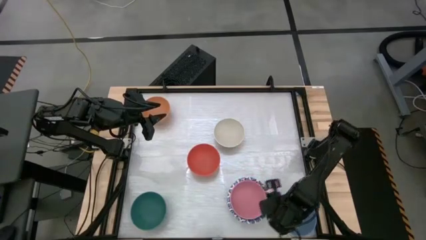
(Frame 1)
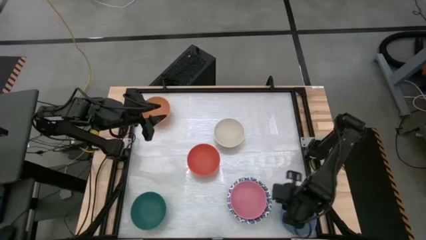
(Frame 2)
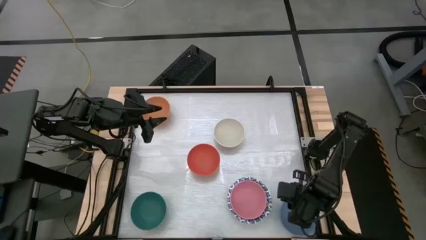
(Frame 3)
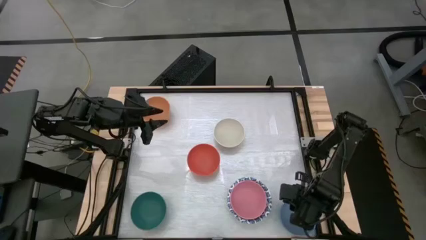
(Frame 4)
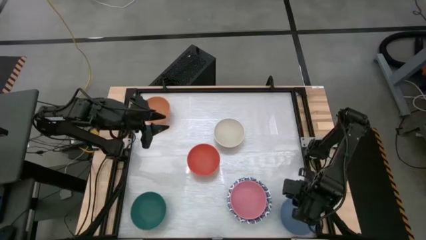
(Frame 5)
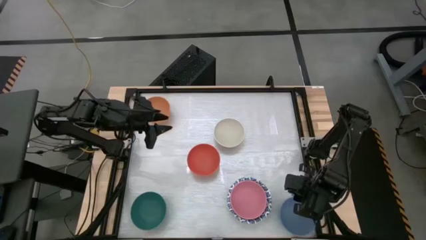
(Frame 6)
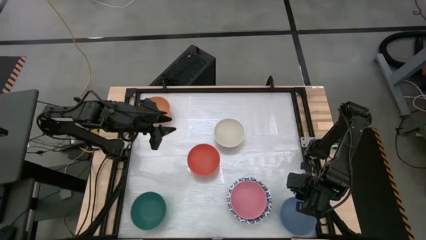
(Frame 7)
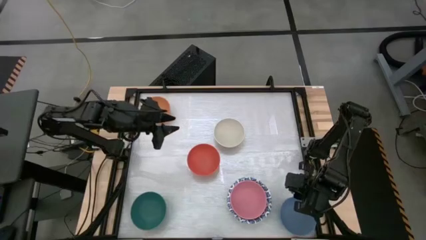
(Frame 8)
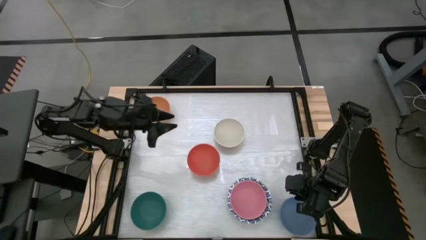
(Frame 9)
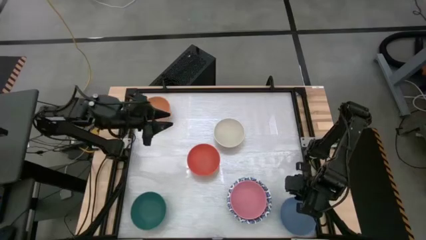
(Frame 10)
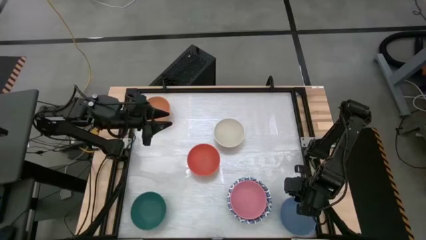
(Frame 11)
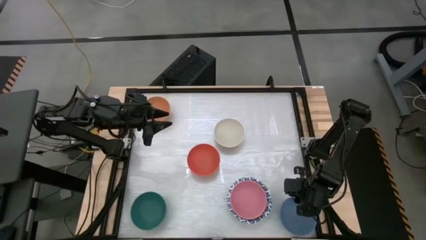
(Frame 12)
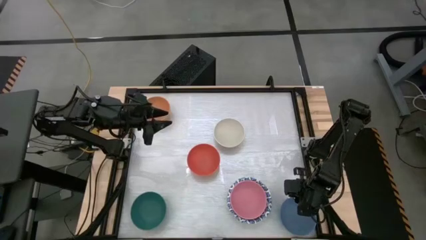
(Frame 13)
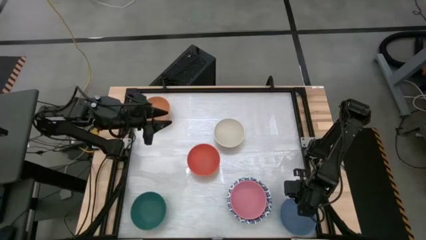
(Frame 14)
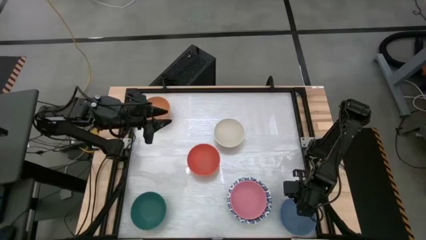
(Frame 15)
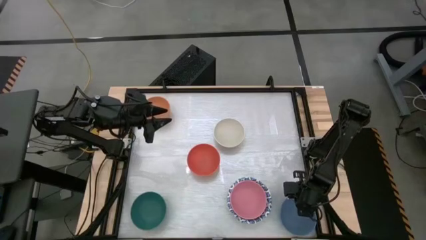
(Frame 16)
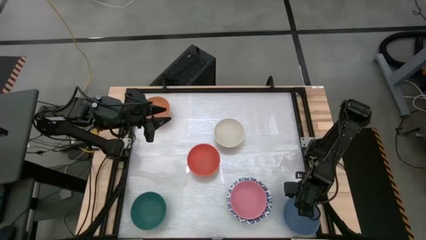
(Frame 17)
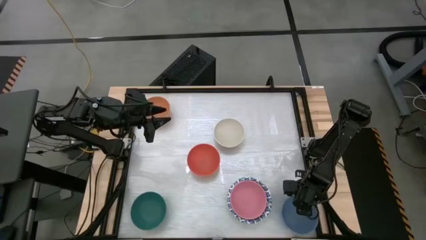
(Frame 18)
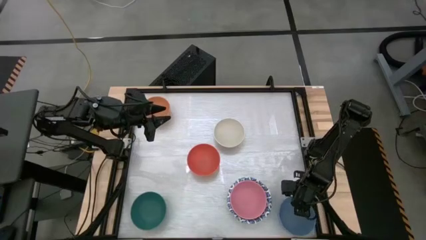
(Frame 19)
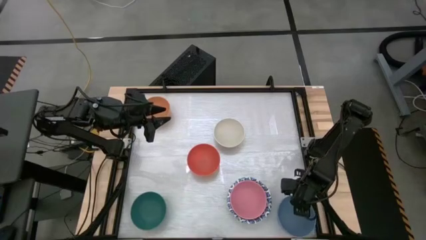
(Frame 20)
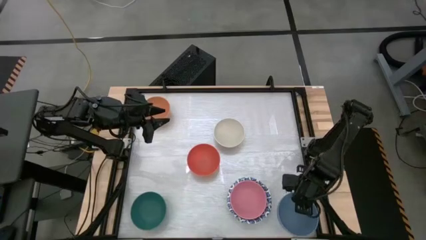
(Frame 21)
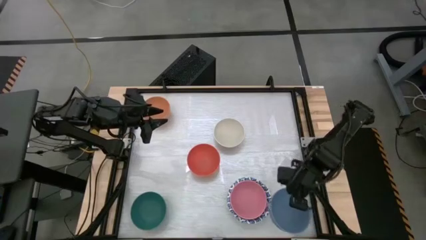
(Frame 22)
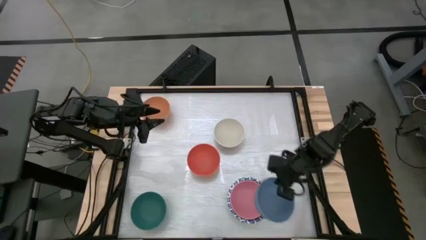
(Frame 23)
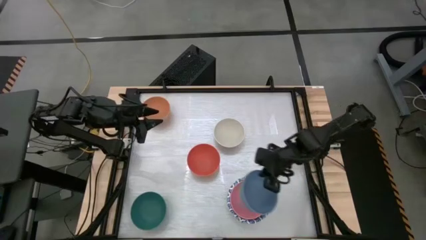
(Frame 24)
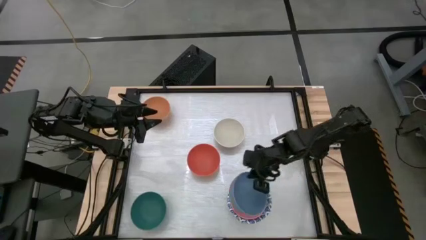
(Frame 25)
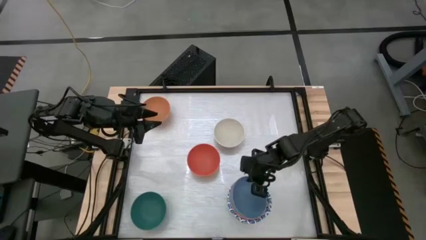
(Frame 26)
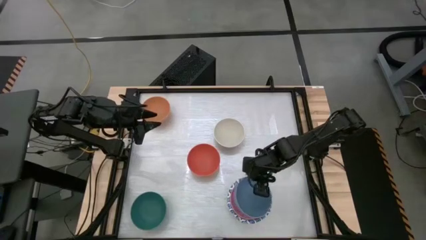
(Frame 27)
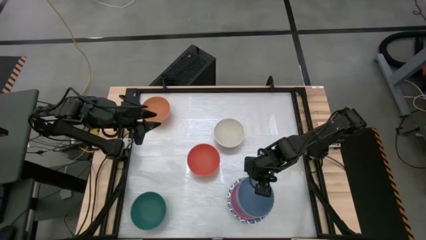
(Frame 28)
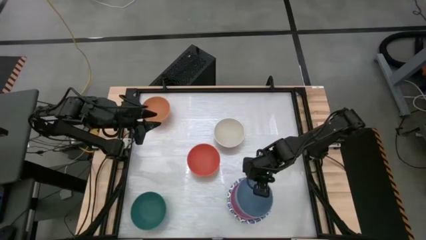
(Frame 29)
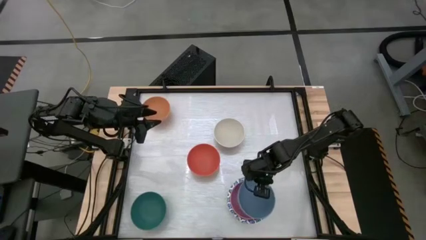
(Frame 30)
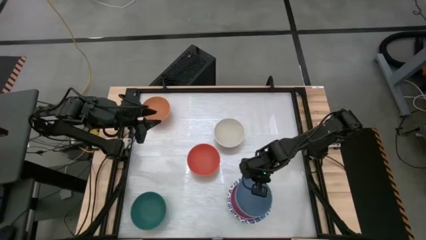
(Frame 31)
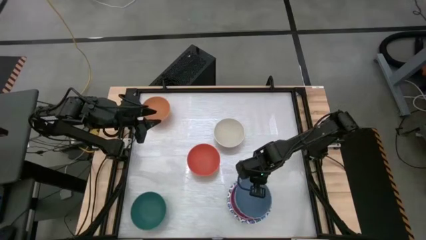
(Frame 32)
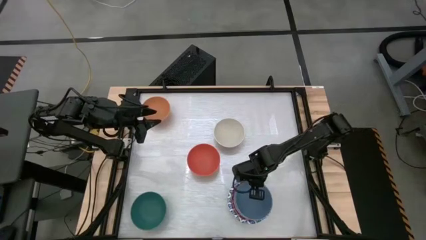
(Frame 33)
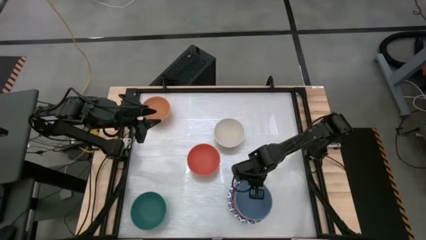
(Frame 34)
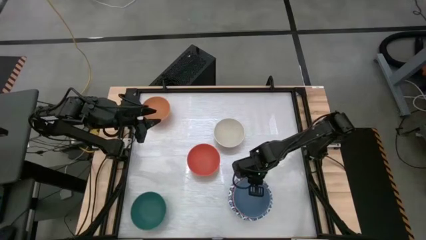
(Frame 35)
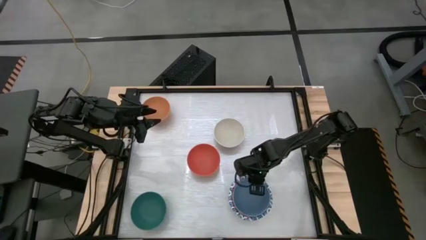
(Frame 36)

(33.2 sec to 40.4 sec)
Stack the blue bowl on top of the pink bowl

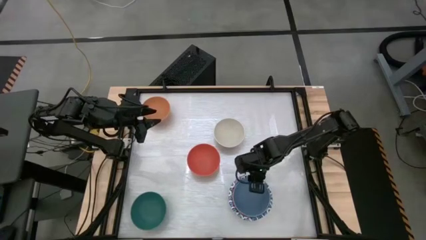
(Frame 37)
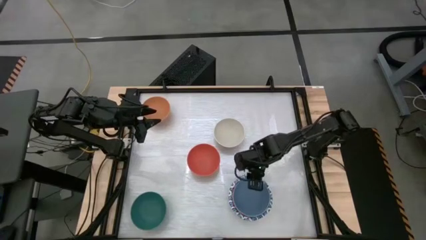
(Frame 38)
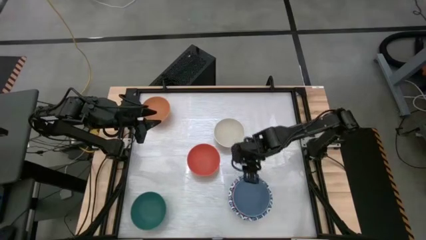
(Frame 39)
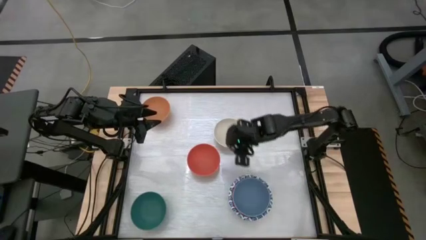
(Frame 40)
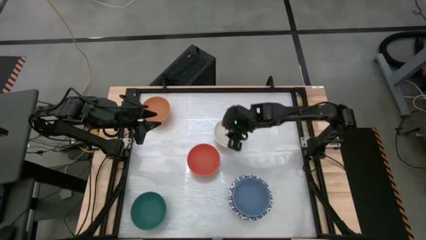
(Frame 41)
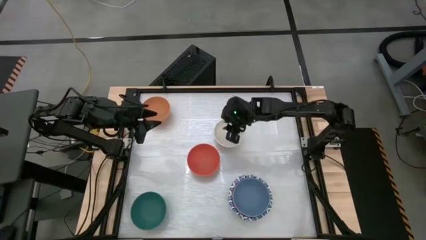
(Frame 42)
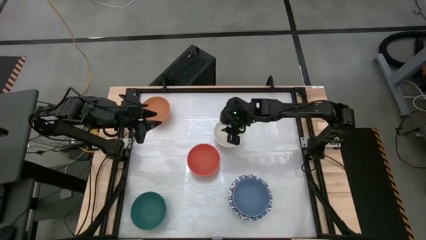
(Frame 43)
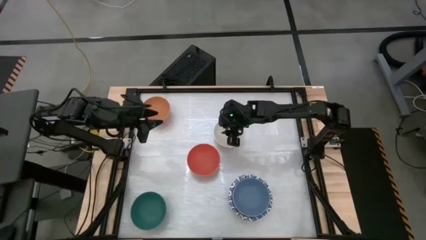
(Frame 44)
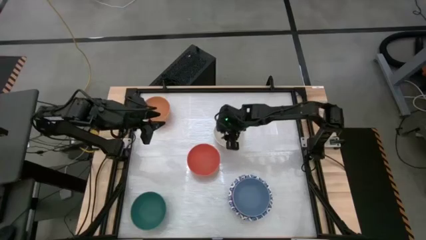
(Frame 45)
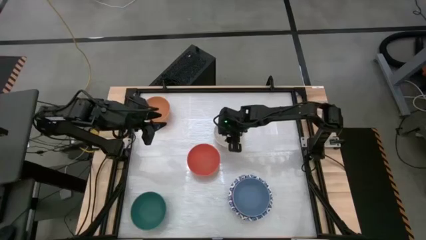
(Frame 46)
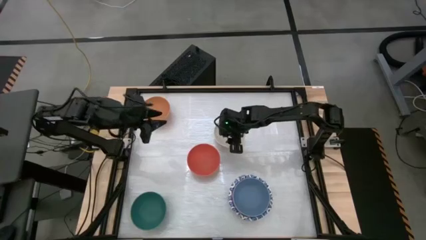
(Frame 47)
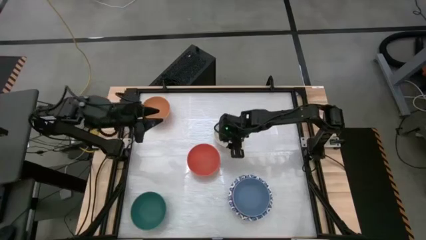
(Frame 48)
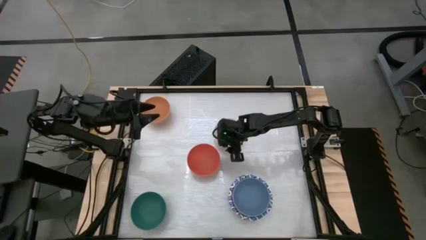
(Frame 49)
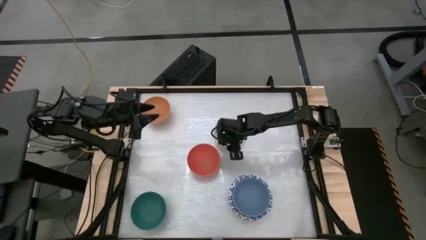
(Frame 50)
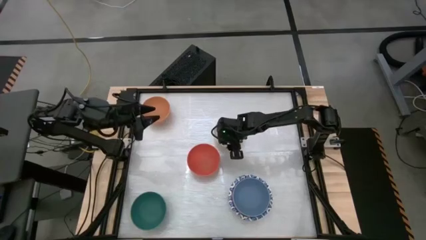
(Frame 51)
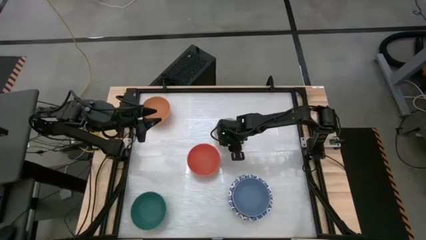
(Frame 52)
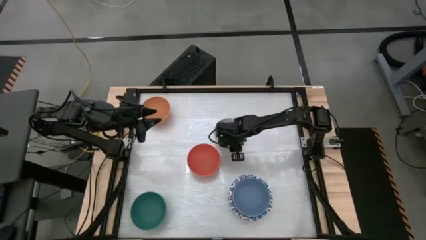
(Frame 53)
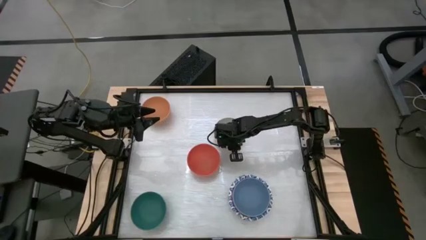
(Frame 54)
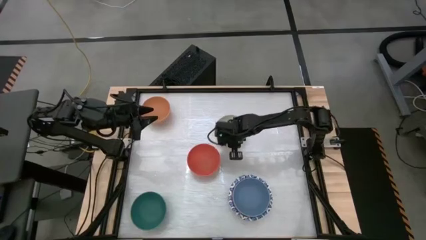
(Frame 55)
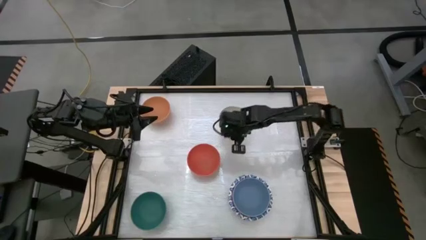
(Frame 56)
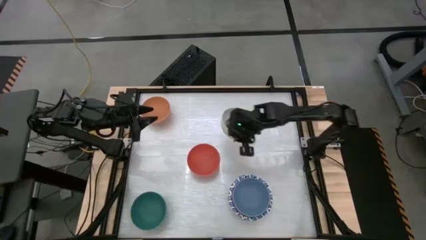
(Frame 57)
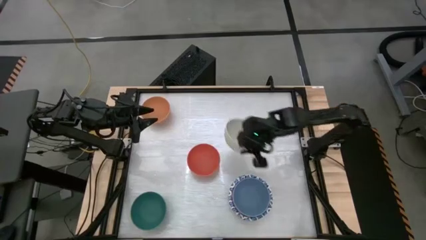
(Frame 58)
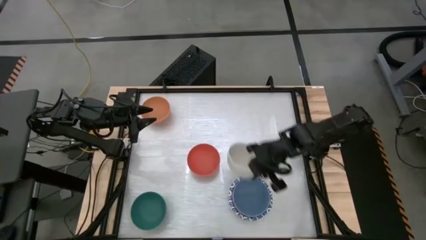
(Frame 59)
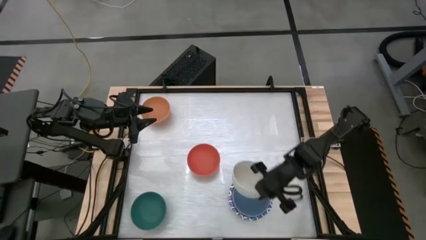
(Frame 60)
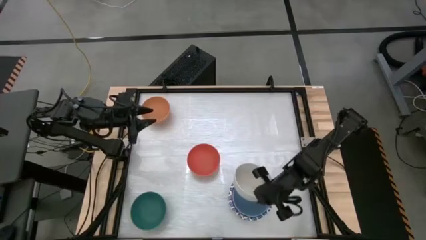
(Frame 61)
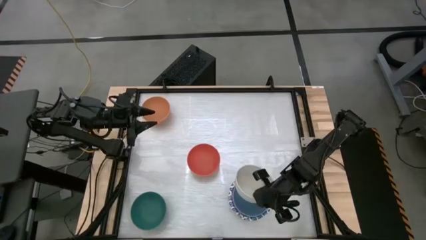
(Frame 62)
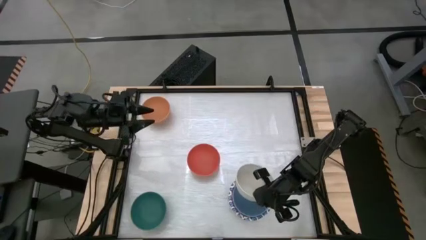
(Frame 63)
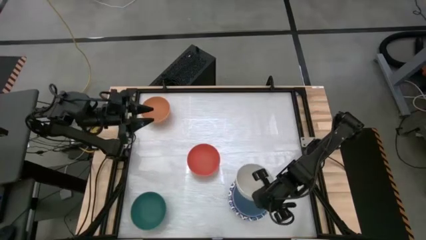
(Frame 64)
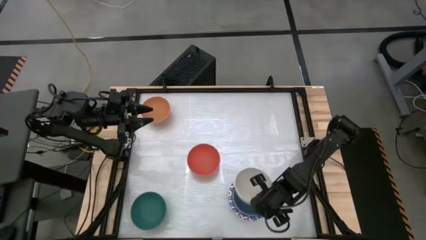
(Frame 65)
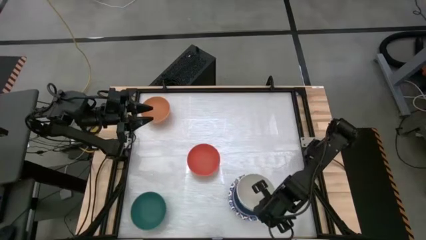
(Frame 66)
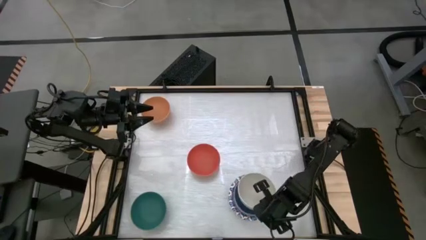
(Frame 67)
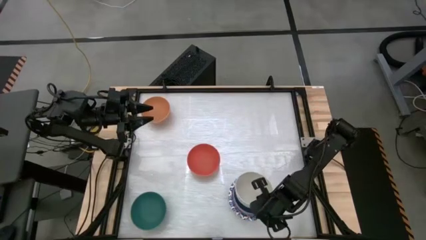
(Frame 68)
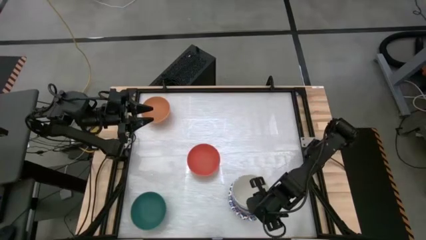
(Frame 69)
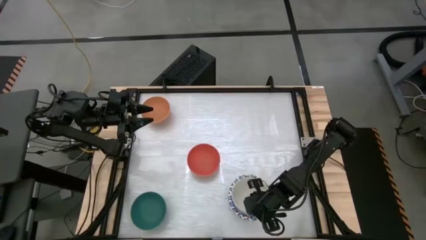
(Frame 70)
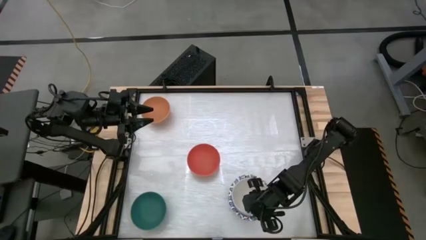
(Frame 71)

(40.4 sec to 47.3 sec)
Stack the white bowl on top of the blue bowl

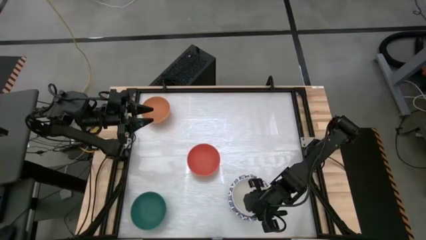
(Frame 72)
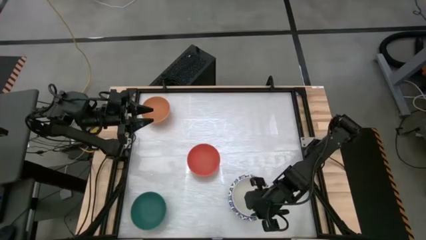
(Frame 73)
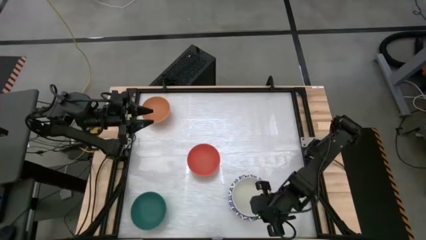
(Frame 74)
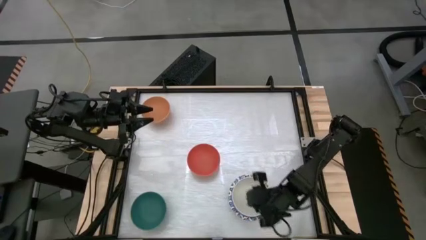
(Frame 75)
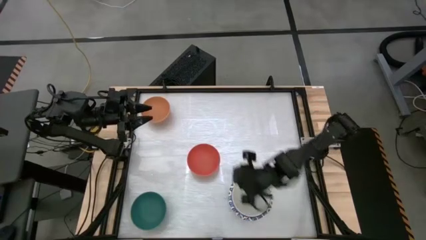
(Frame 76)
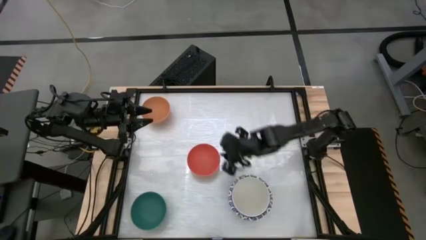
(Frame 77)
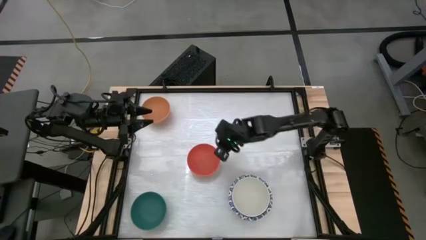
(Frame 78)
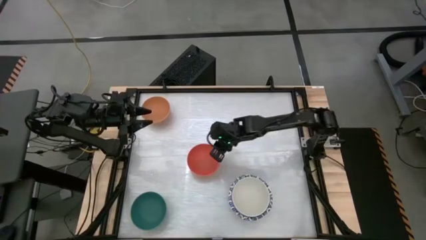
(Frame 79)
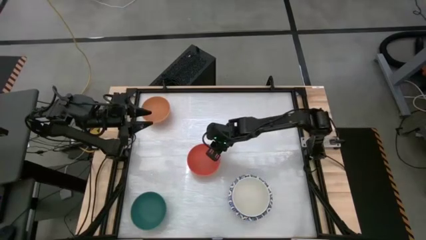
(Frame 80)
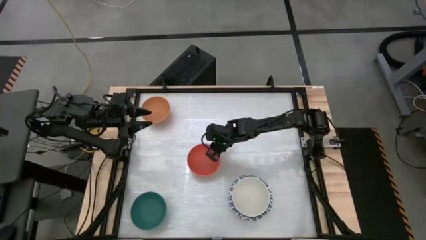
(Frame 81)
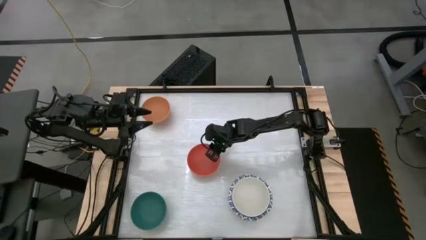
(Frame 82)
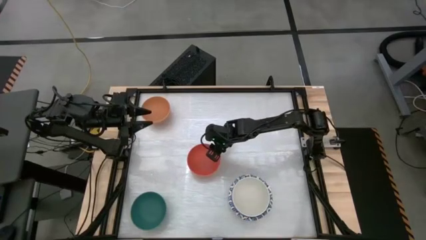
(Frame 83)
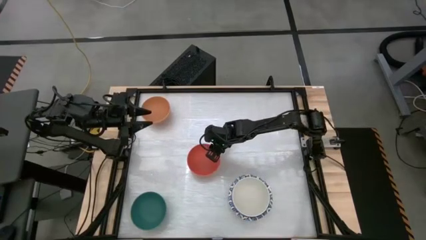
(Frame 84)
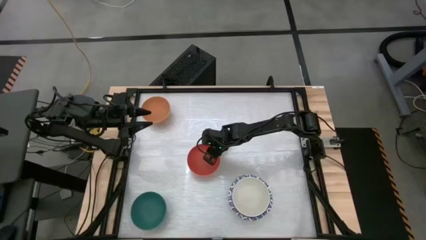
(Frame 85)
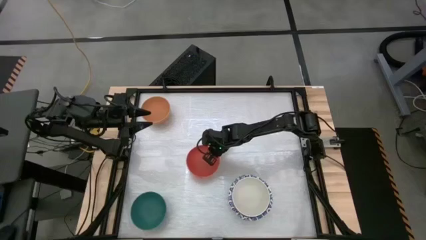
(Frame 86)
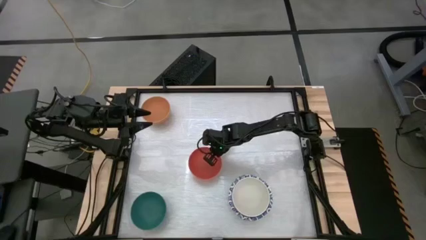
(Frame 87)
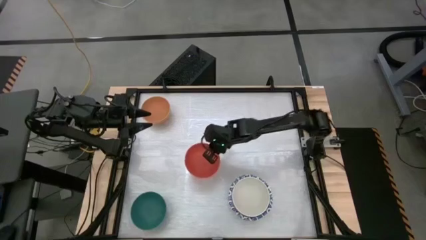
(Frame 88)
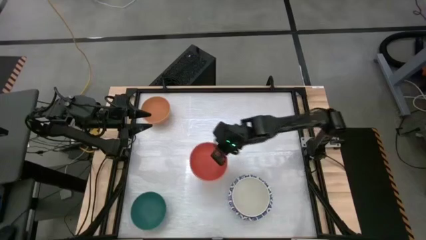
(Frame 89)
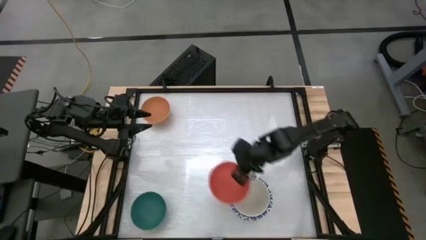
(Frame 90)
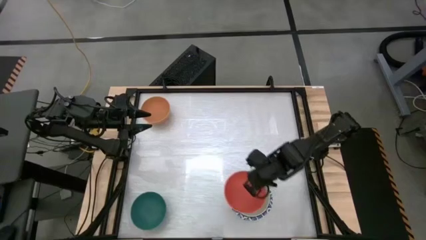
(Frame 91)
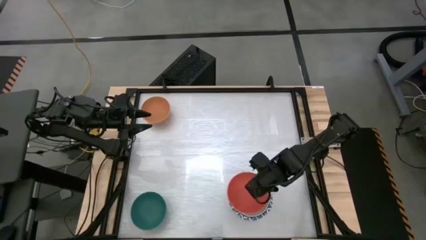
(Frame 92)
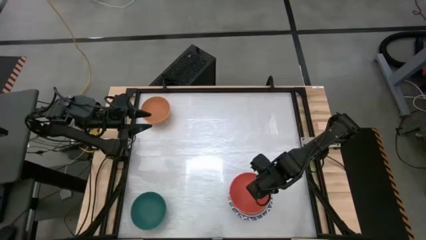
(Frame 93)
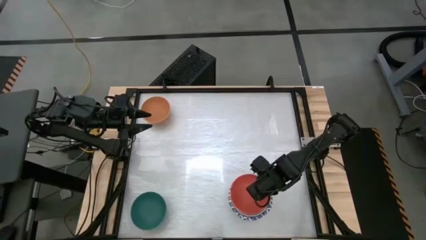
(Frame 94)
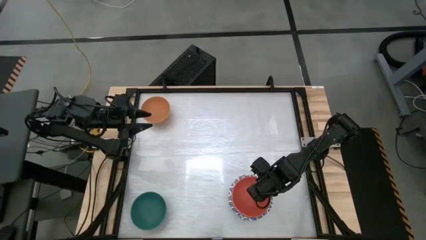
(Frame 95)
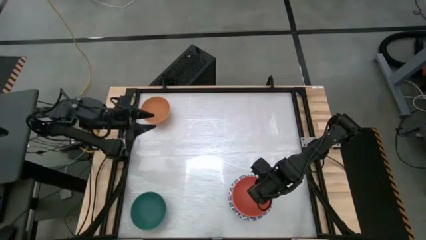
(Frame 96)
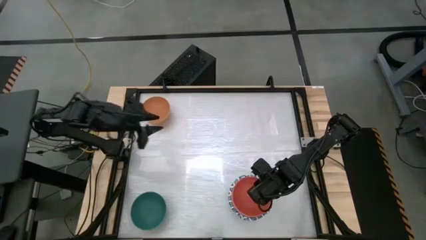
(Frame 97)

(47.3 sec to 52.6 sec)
Stack the orange bowl on top of the white bowl
